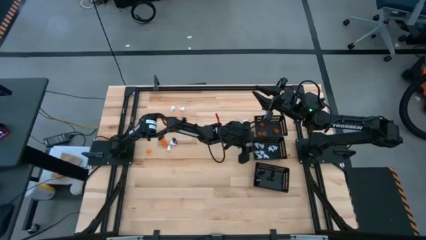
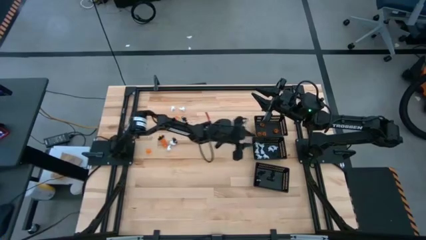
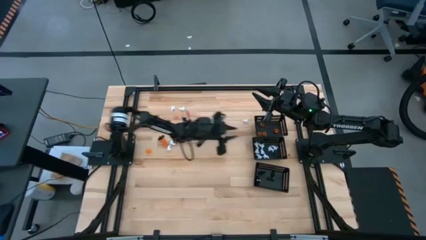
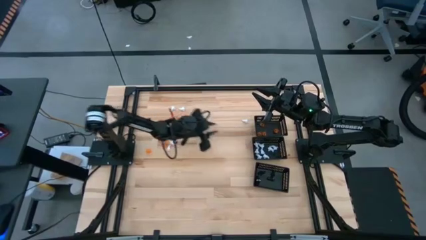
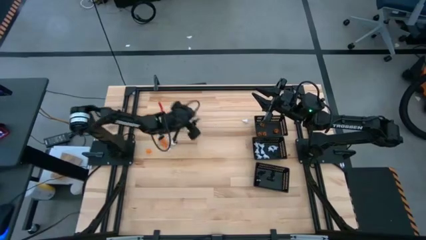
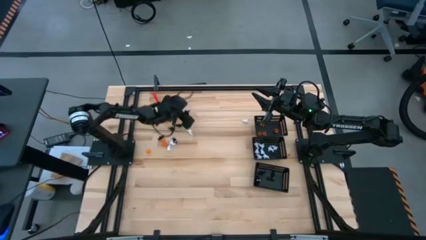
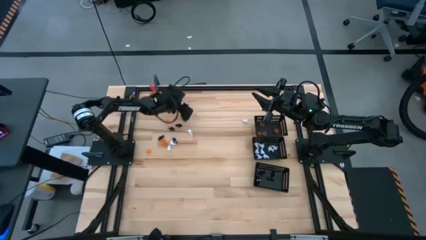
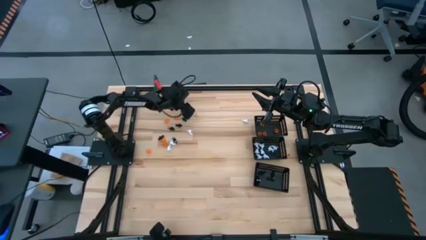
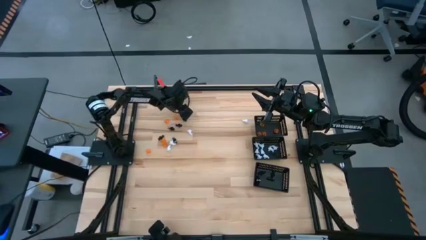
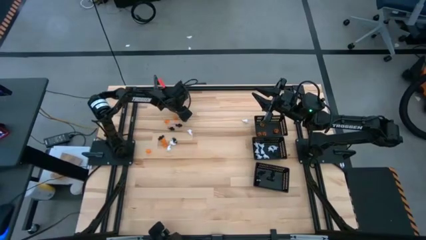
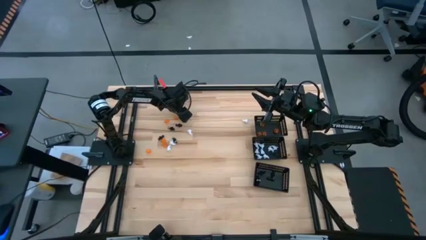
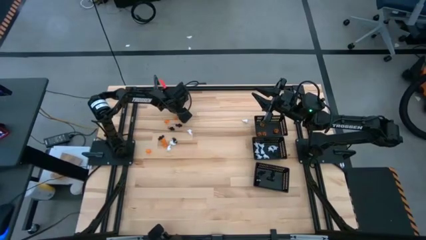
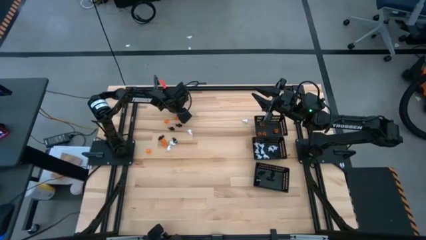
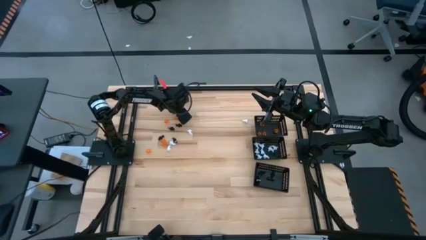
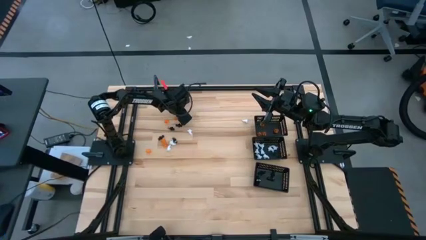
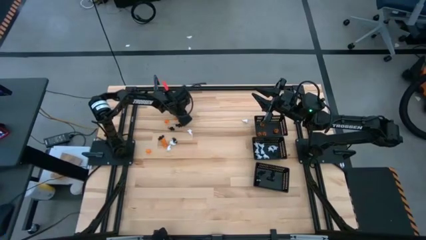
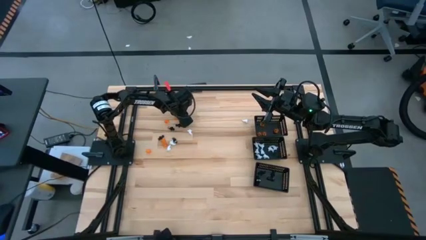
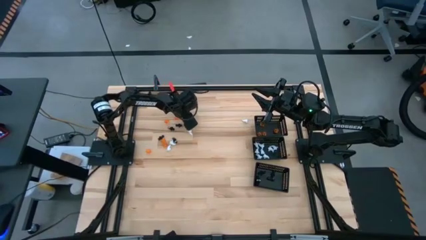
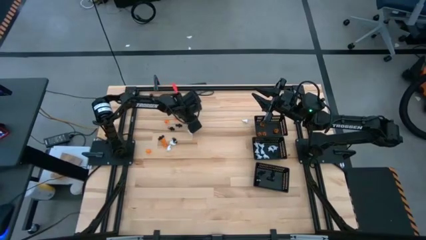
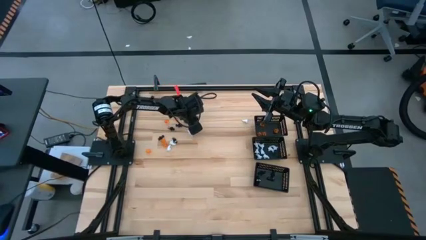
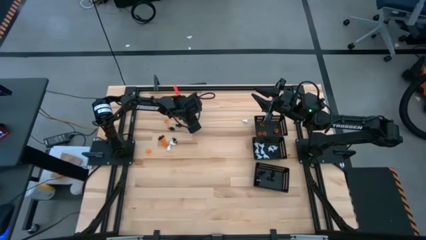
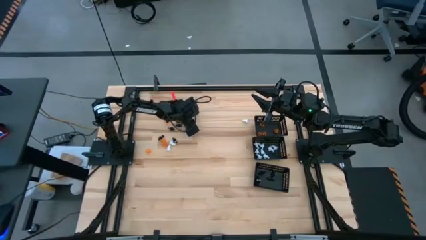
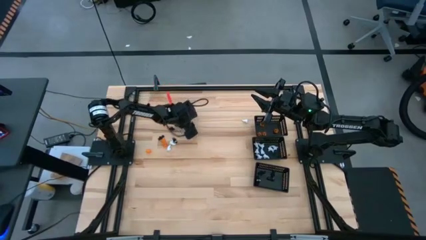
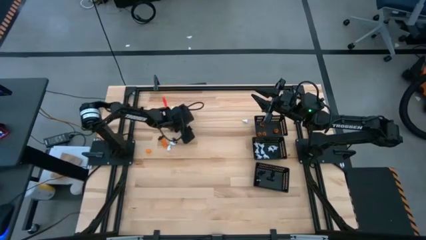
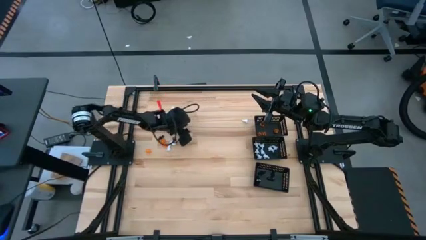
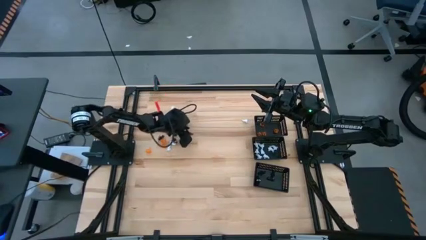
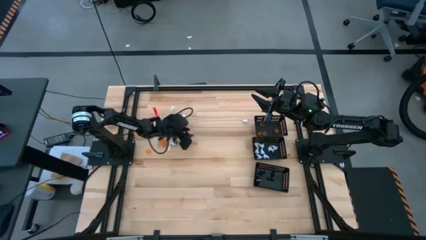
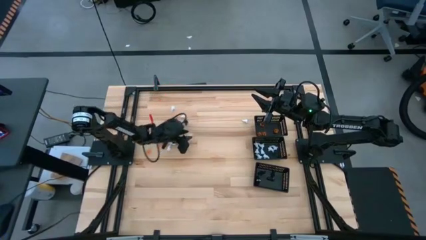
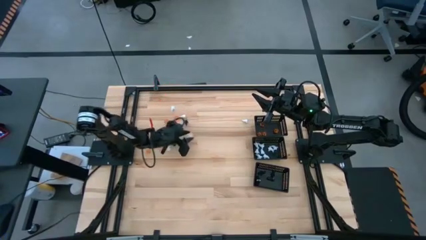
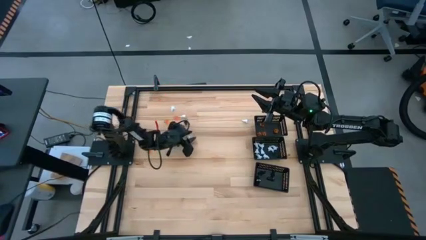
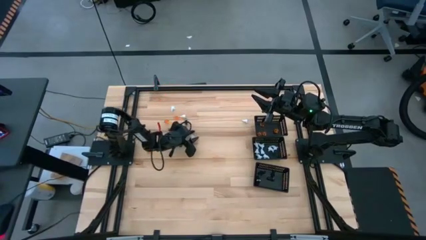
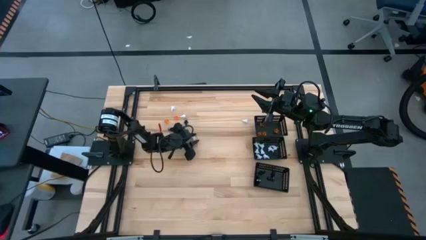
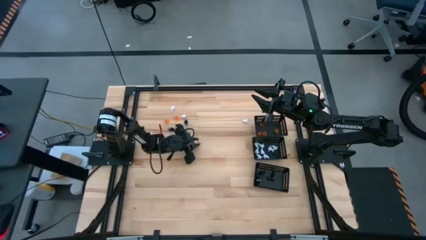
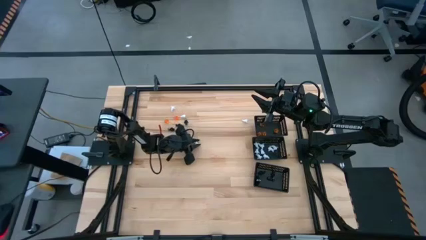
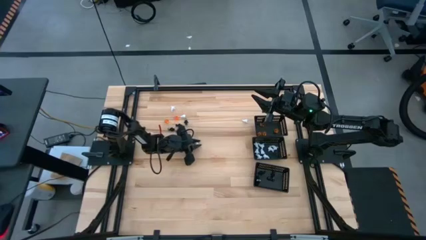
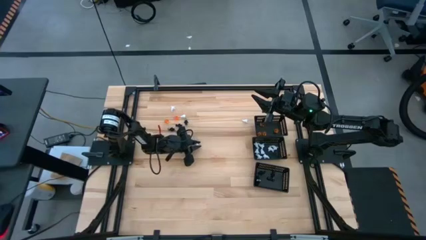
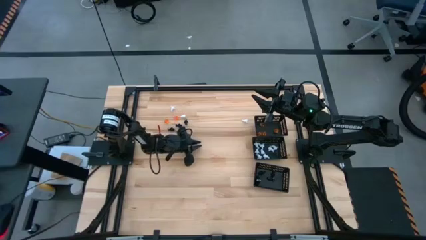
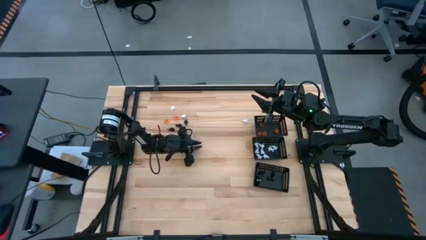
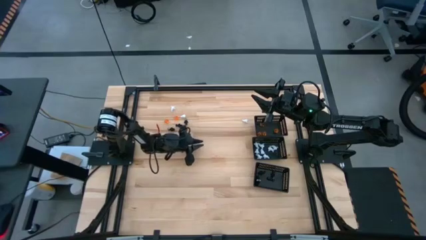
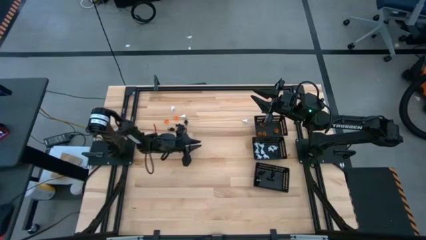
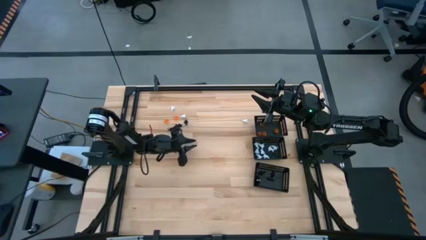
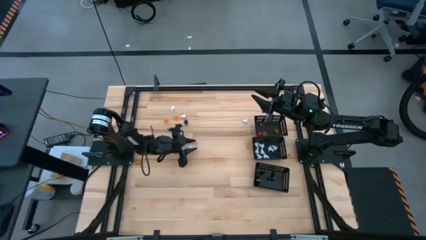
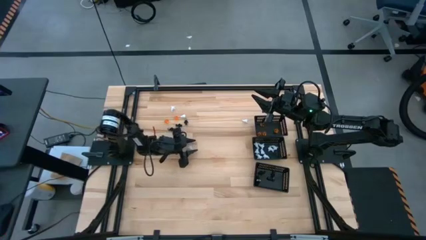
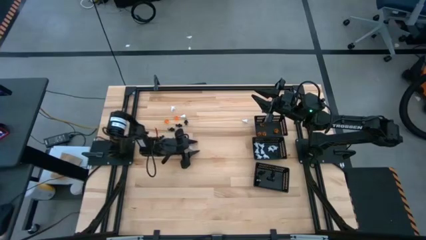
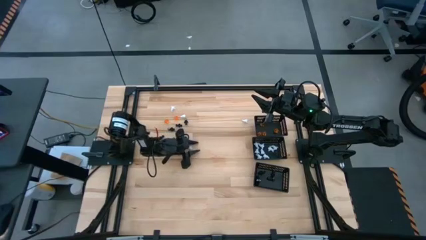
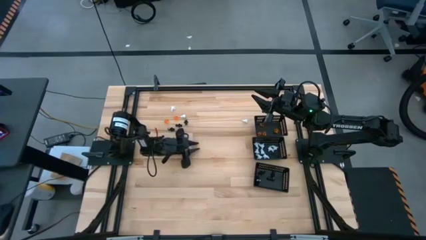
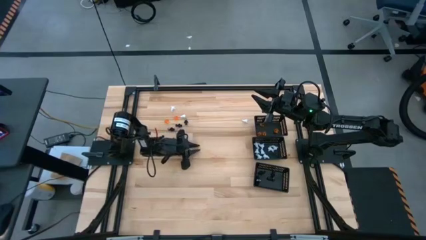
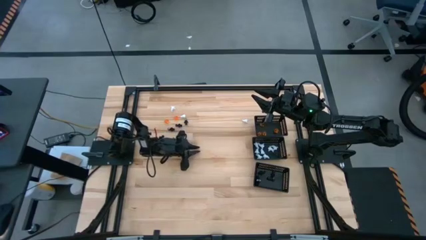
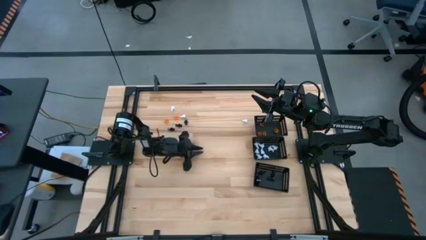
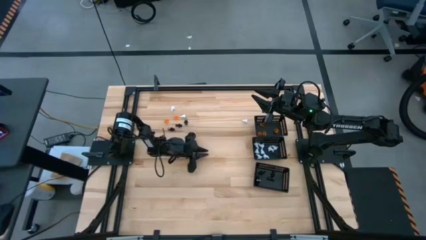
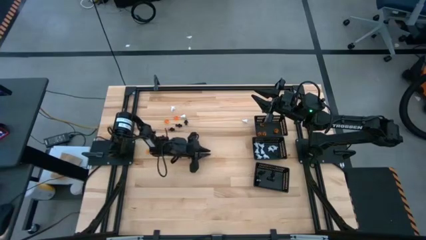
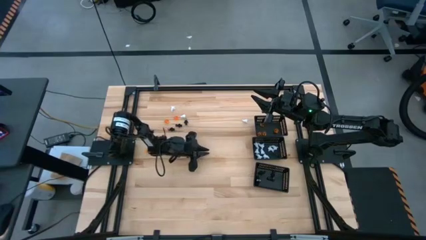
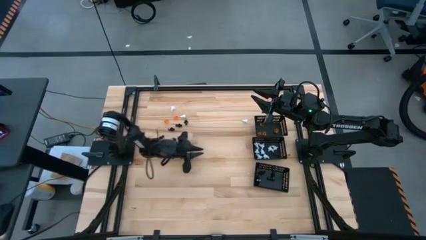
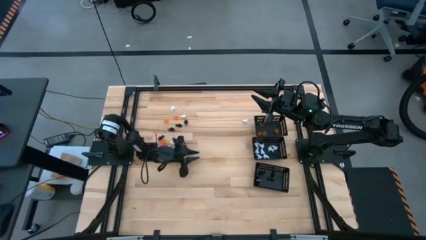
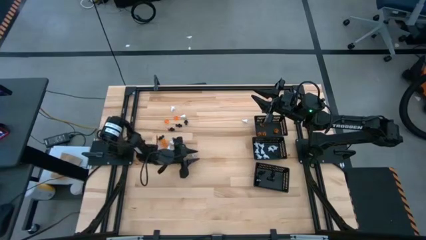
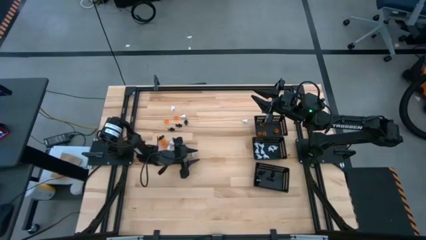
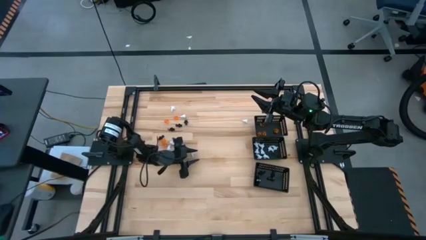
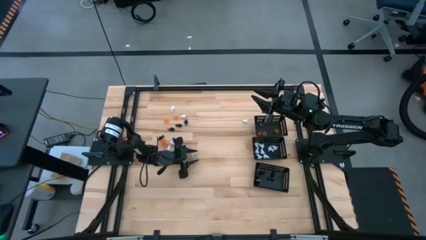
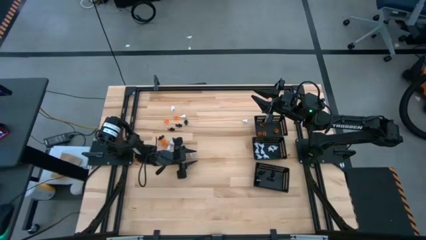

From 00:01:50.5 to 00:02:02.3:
Task: Sort Halloween decoration
Put the white ghost toy into the center black bin

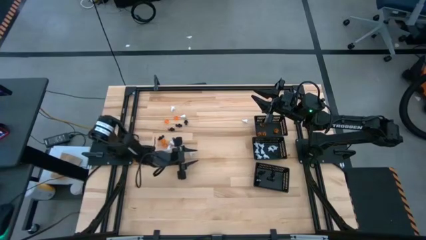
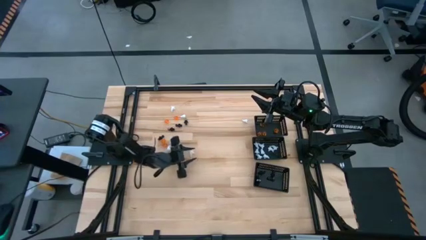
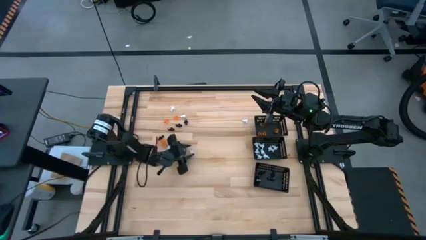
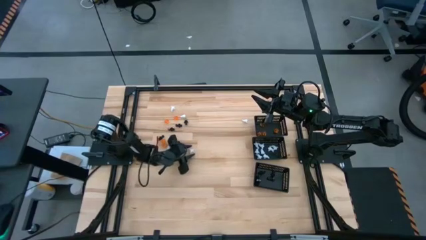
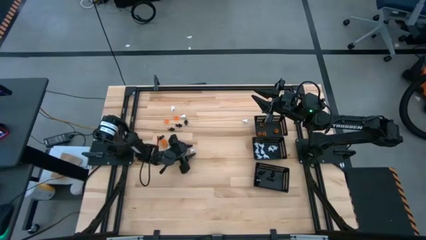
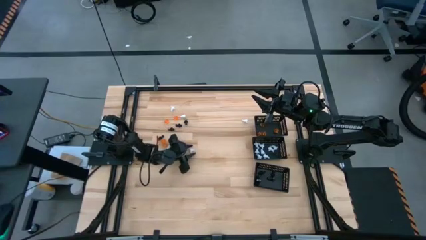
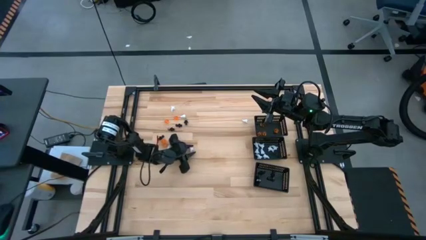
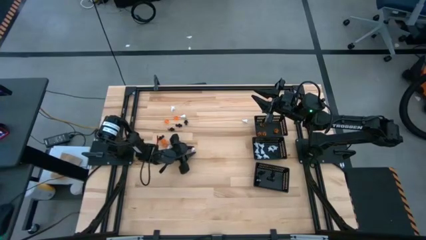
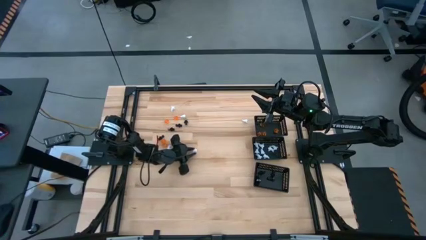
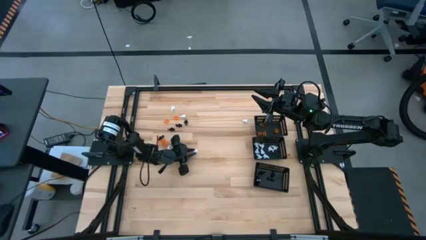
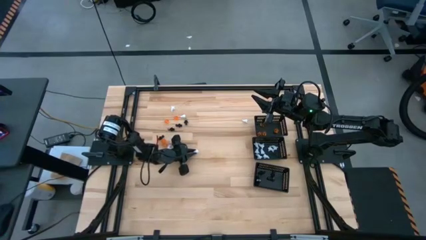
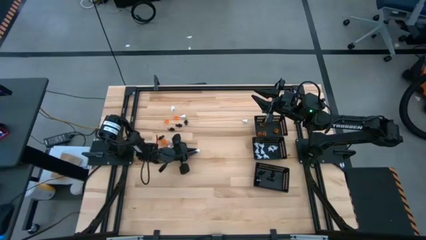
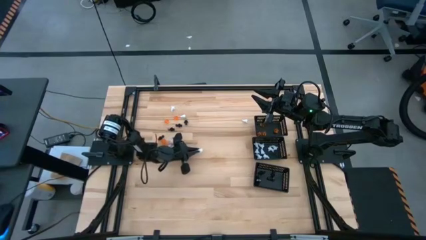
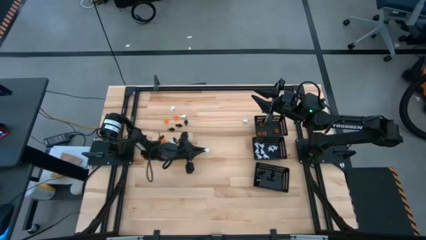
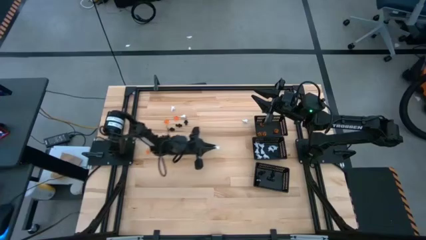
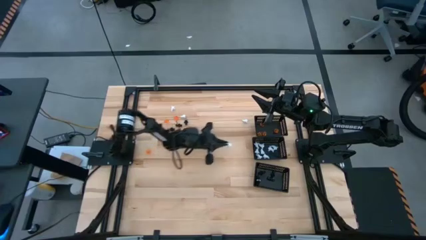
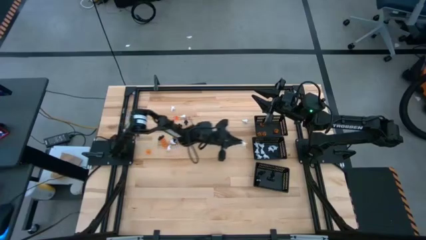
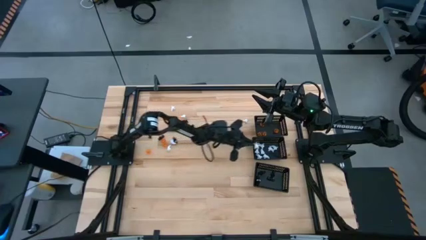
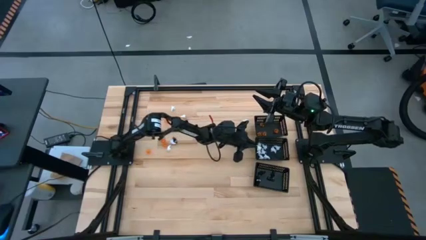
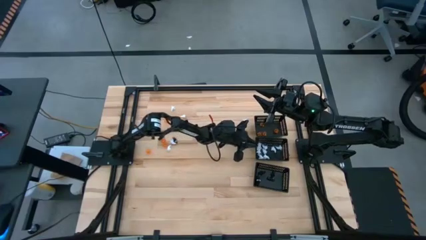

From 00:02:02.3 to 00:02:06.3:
Put the white ghost toy into the center black bin
